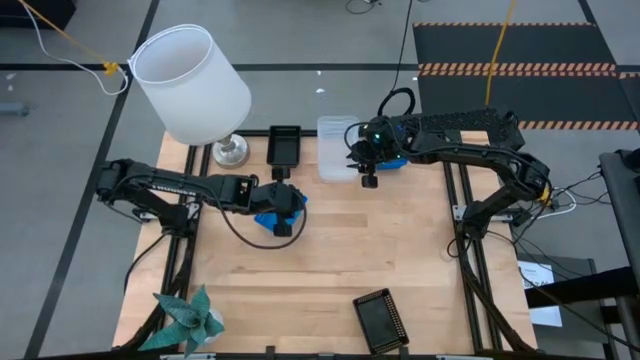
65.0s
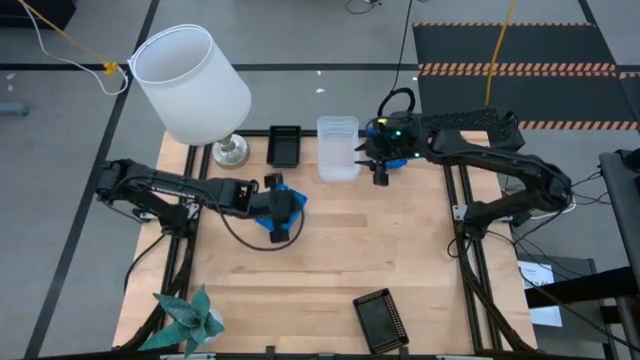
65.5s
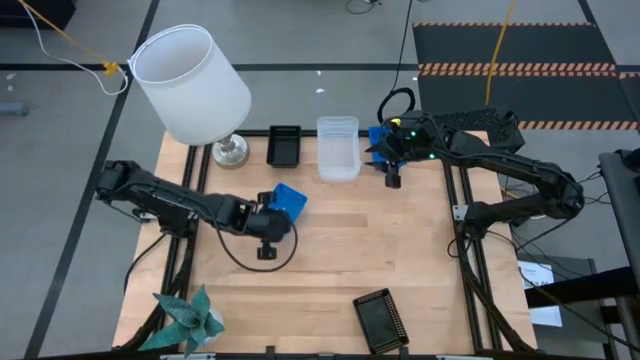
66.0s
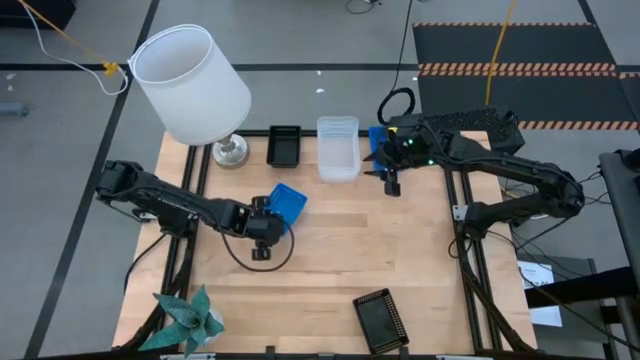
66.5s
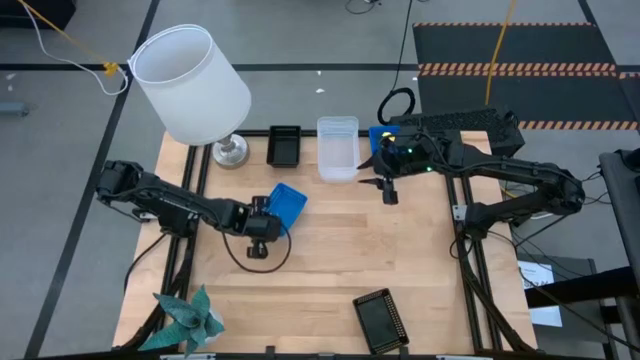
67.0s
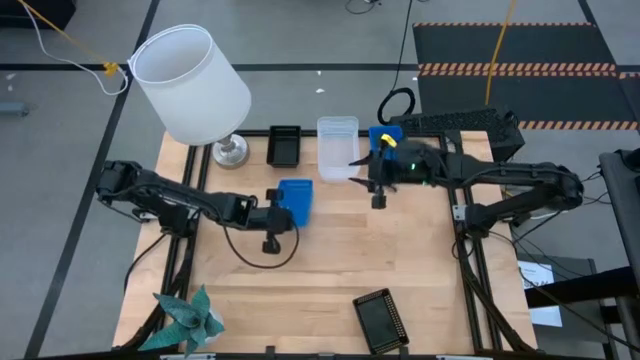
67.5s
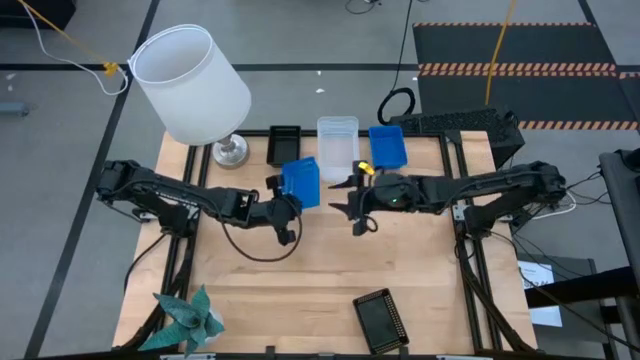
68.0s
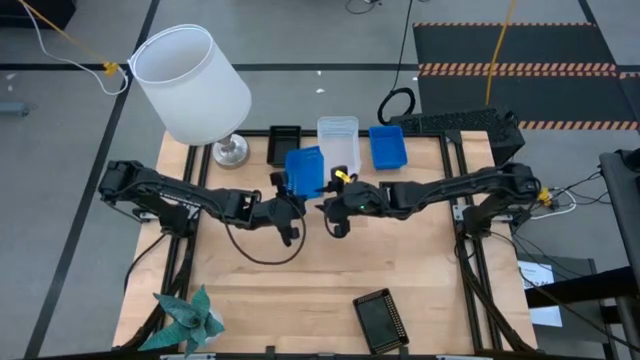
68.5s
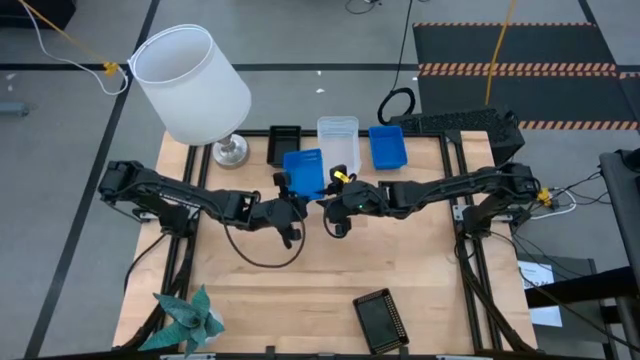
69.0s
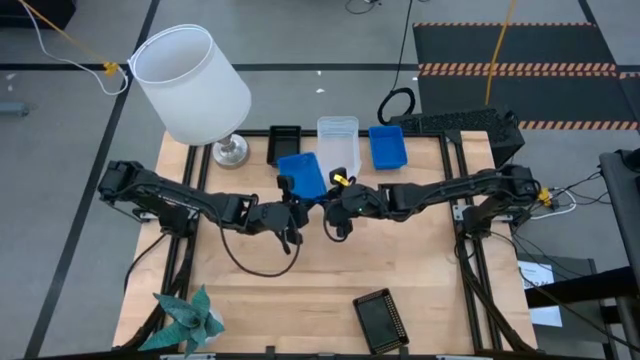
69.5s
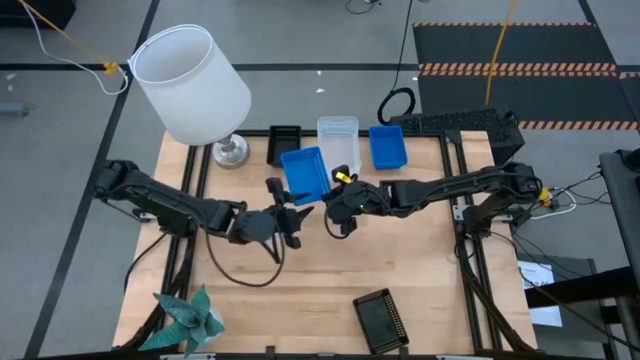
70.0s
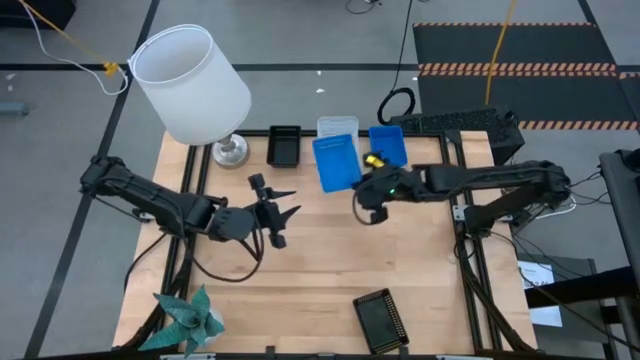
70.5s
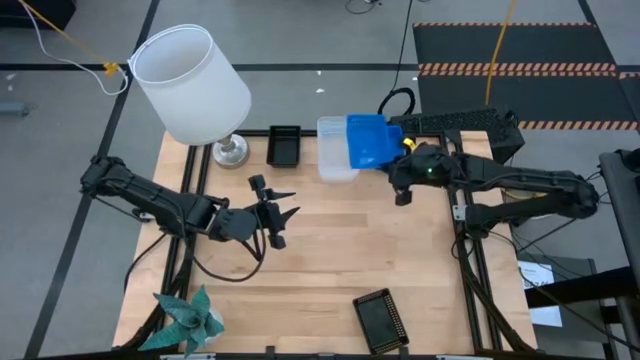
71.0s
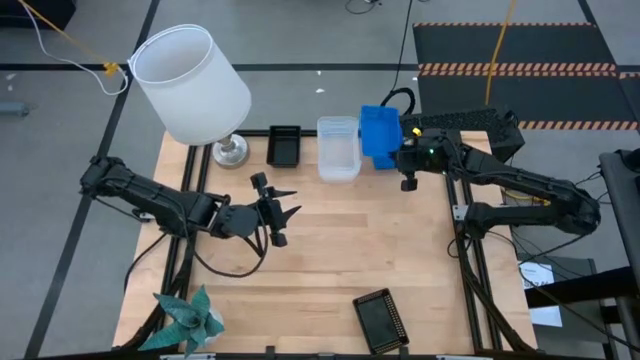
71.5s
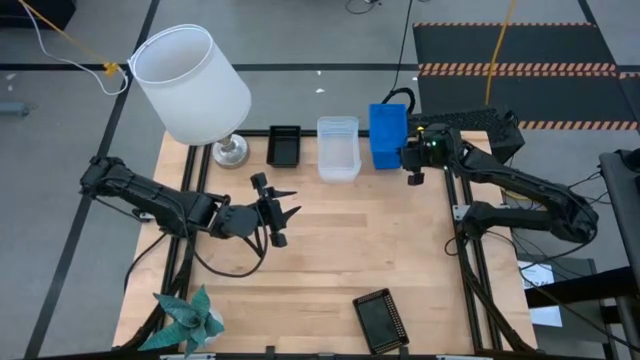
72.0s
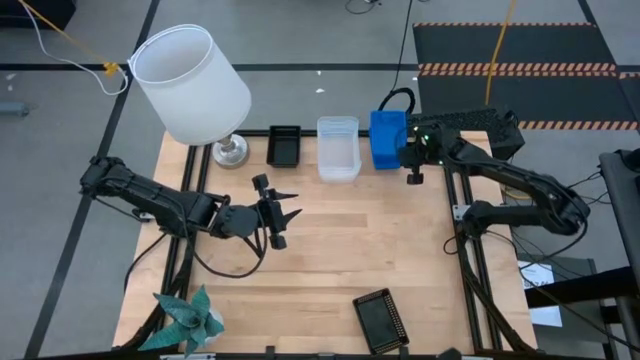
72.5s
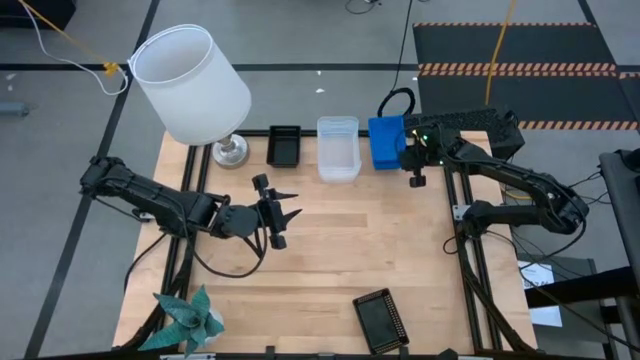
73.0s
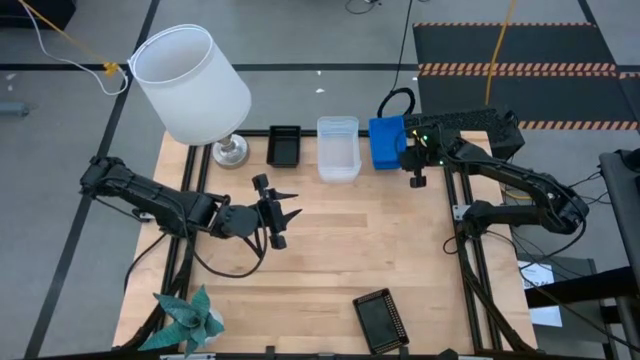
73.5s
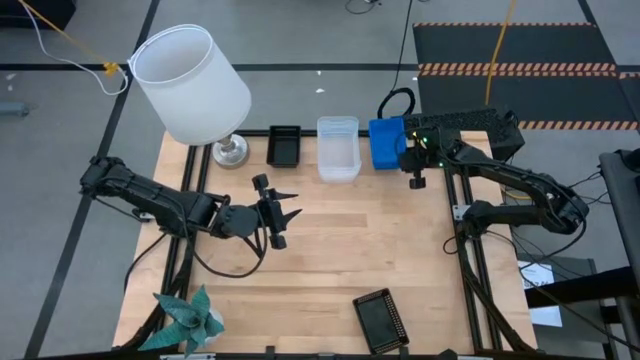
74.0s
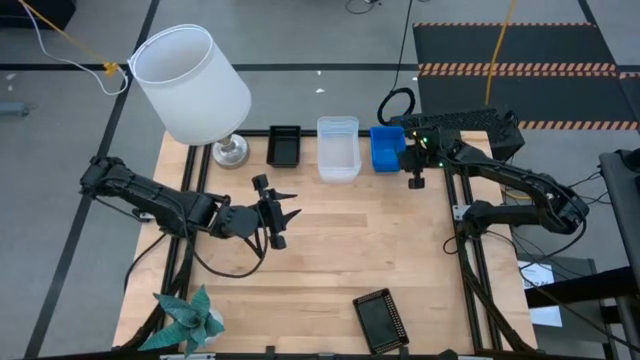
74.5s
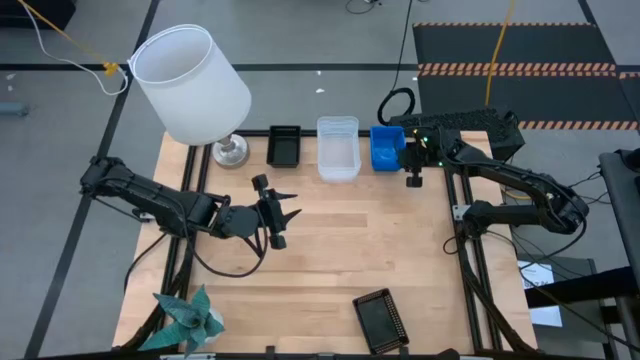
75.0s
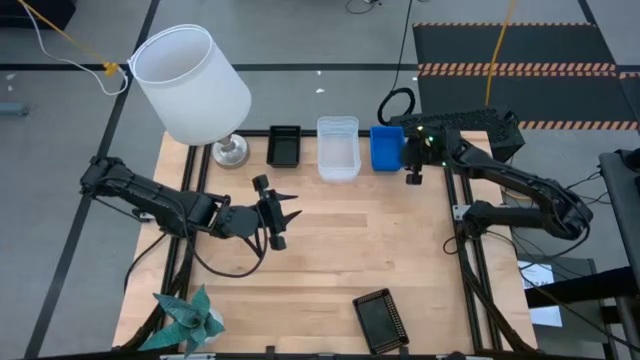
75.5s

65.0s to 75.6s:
Stack the bottom blue bin on the stacked blue bins

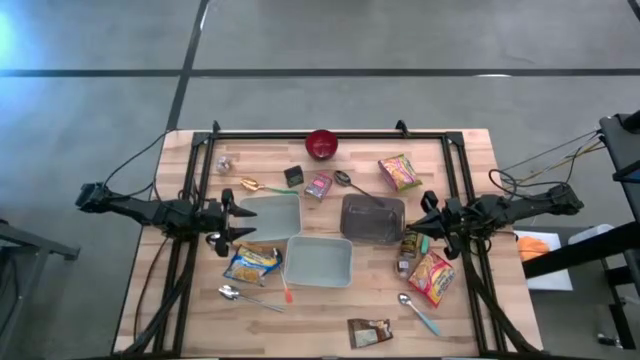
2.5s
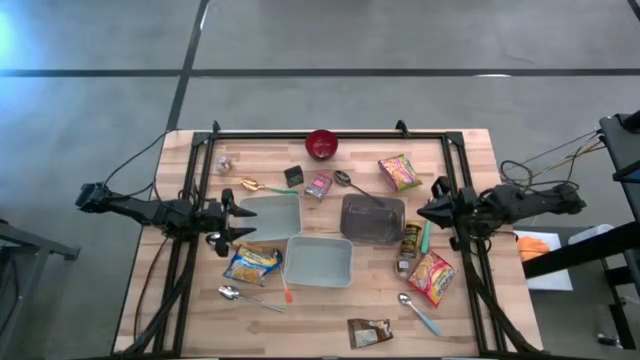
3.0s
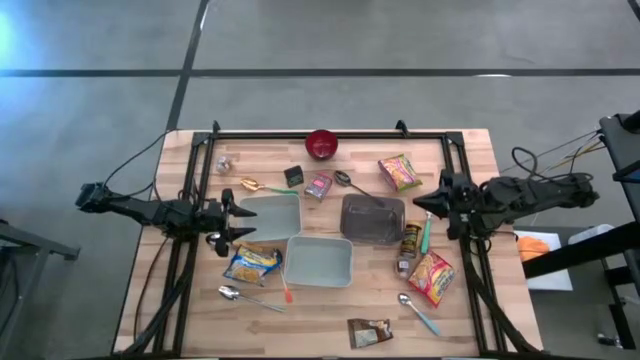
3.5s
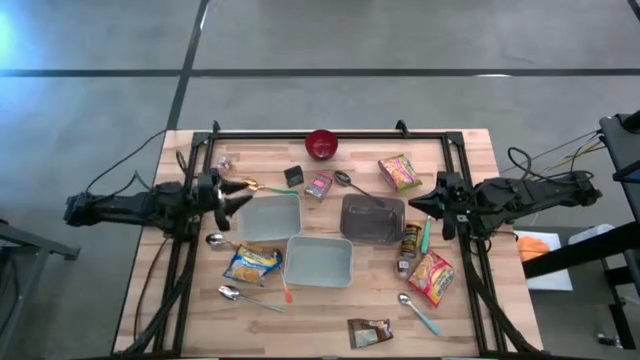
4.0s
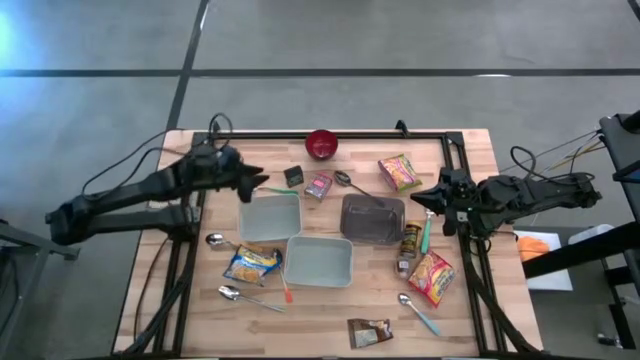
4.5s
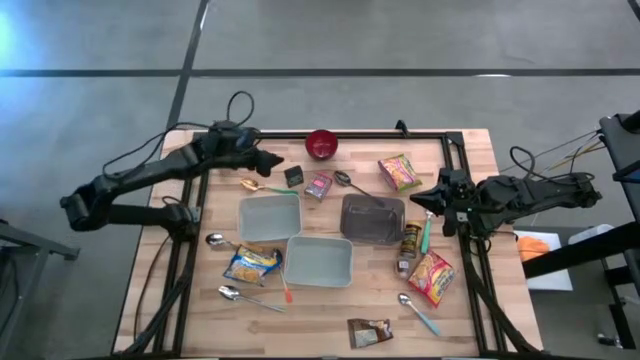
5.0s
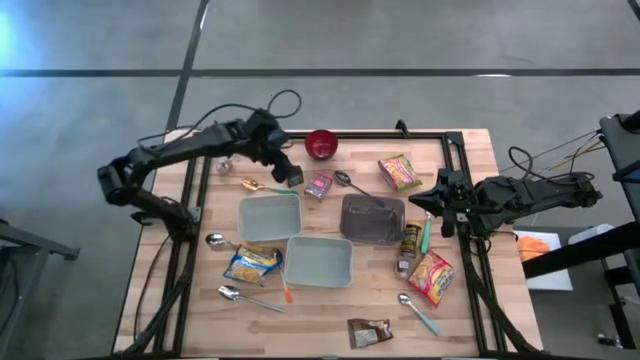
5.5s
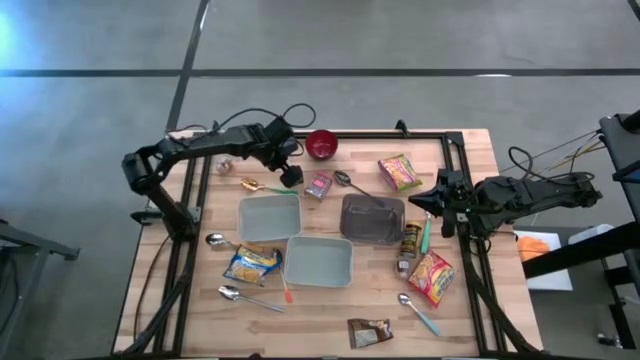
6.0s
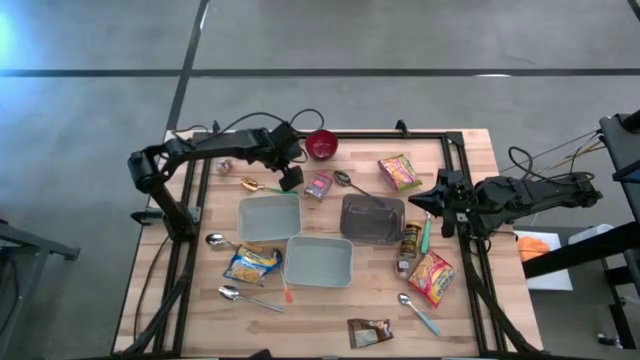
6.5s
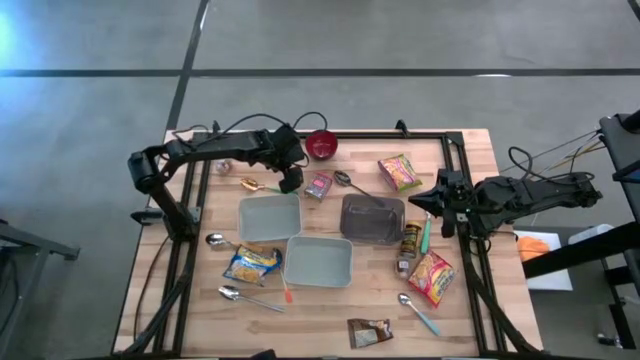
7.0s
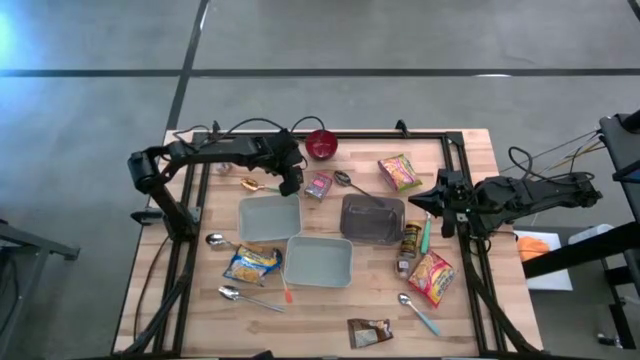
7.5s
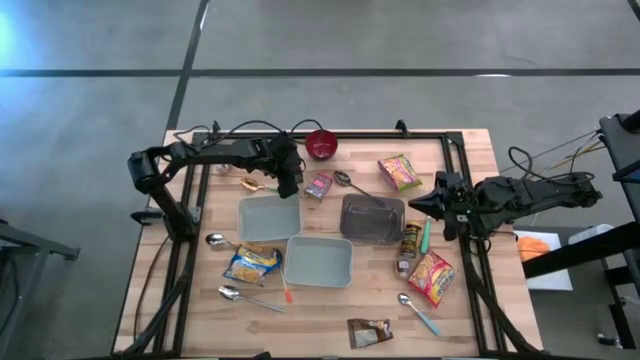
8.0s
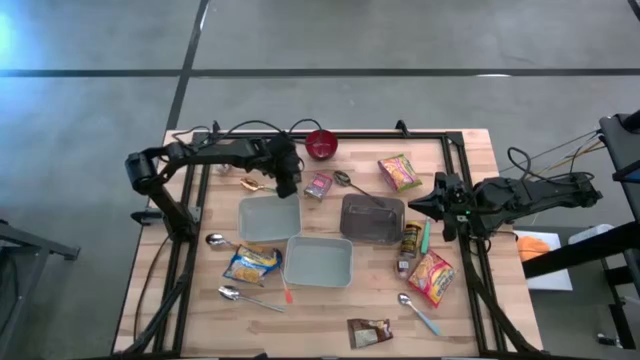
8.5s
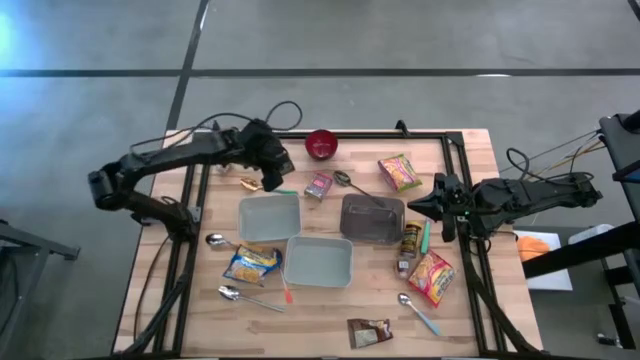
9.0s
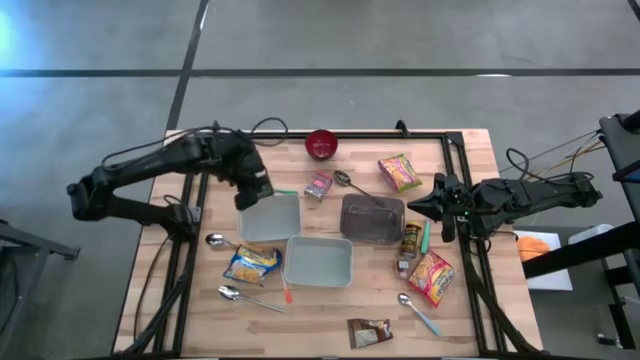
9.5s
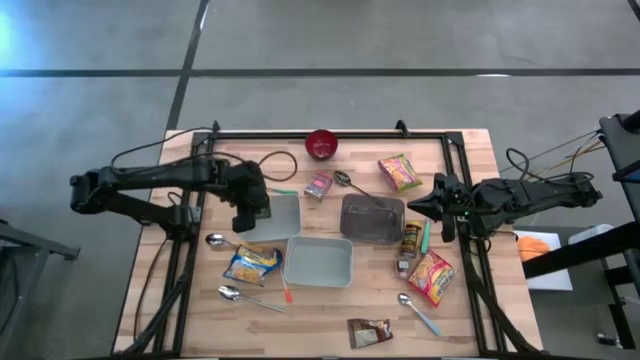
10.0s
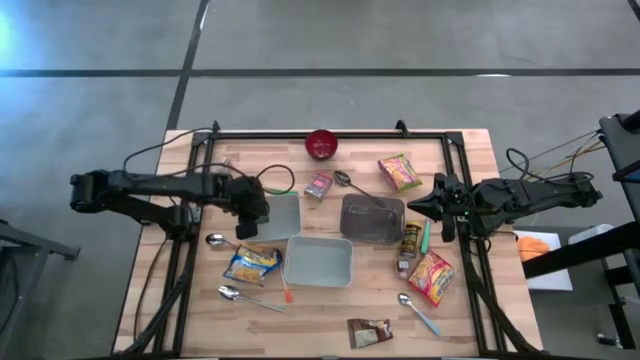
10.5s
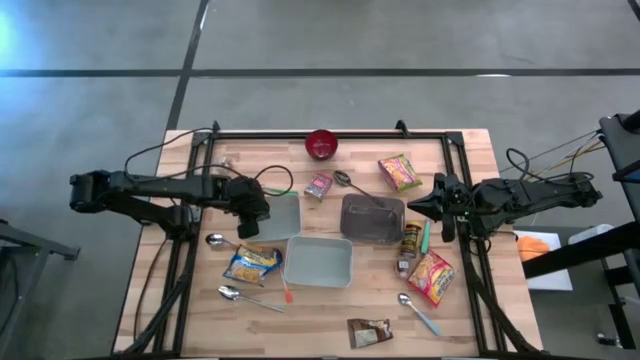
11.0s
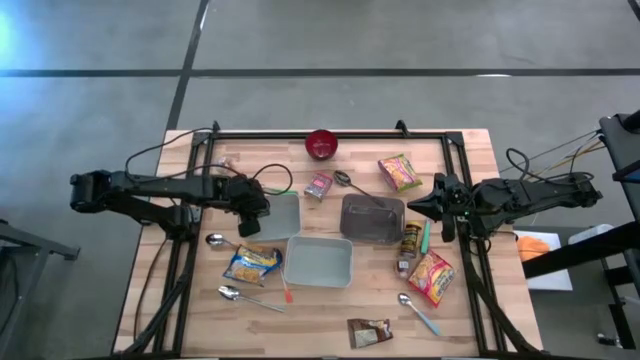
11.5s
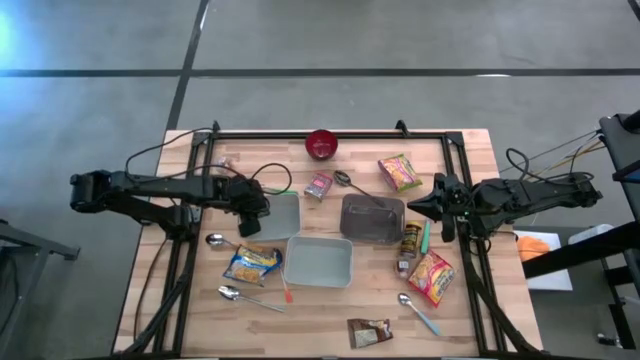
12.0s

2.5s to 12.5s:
Put the black seasoning can into the top gray bin
